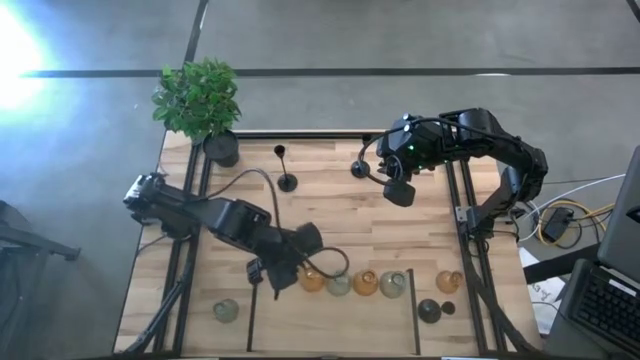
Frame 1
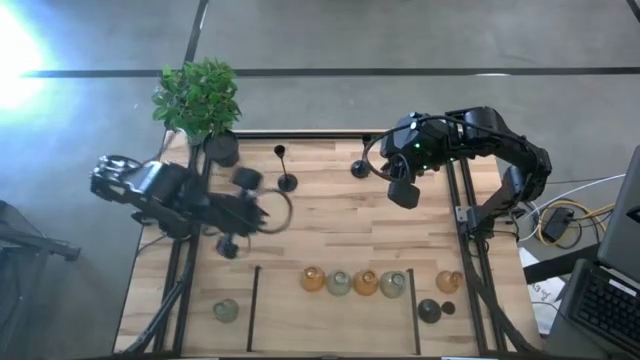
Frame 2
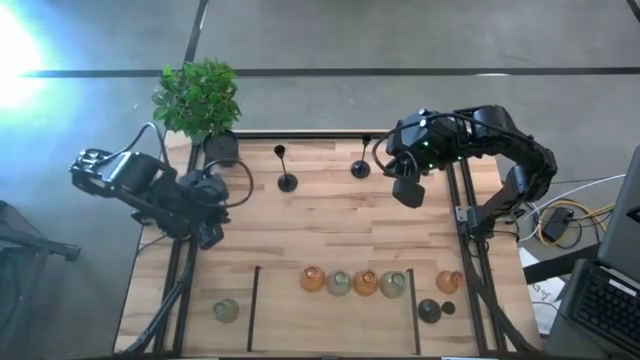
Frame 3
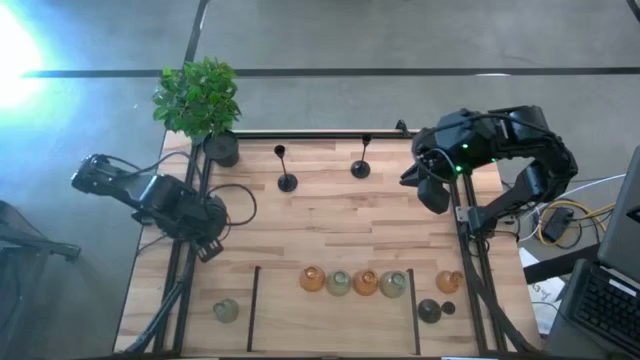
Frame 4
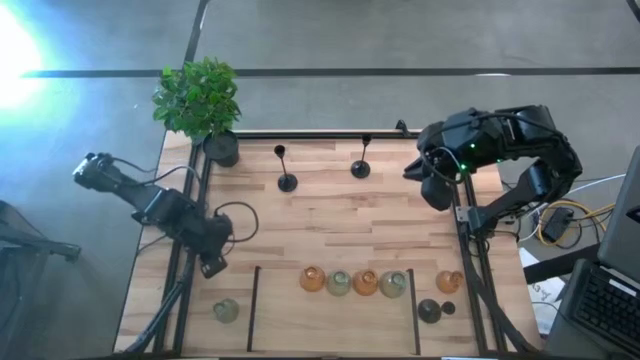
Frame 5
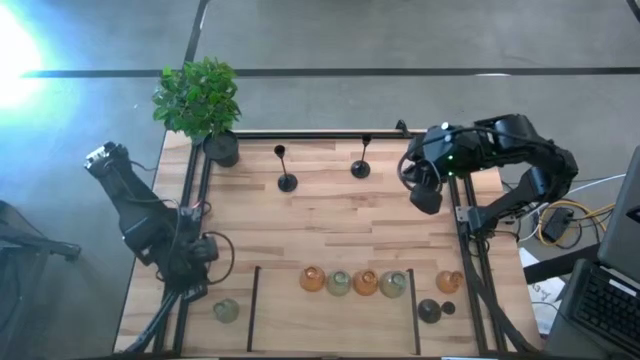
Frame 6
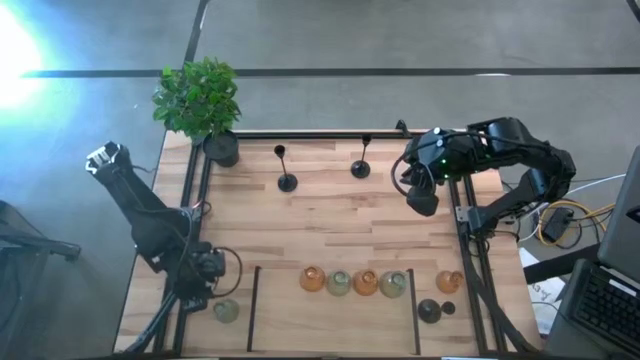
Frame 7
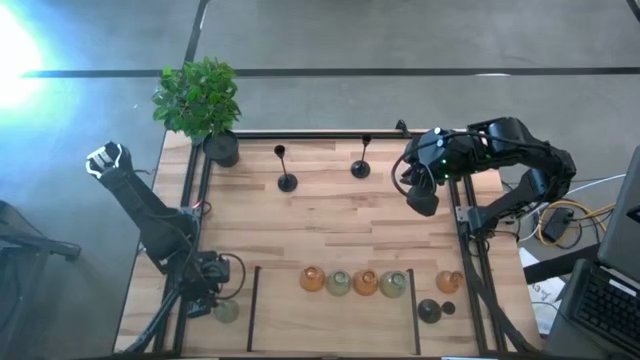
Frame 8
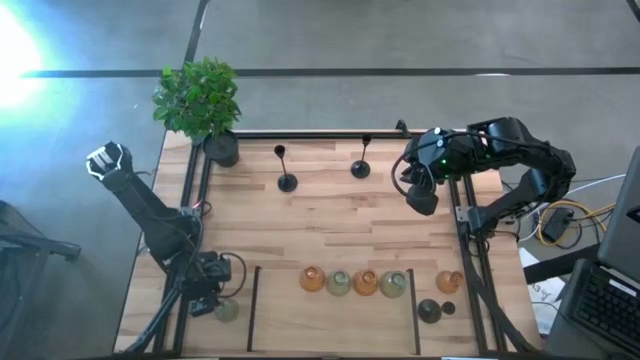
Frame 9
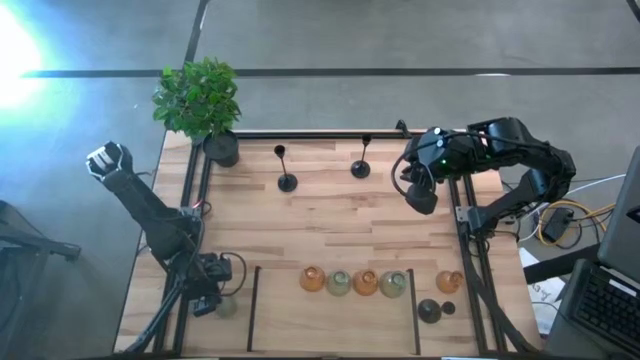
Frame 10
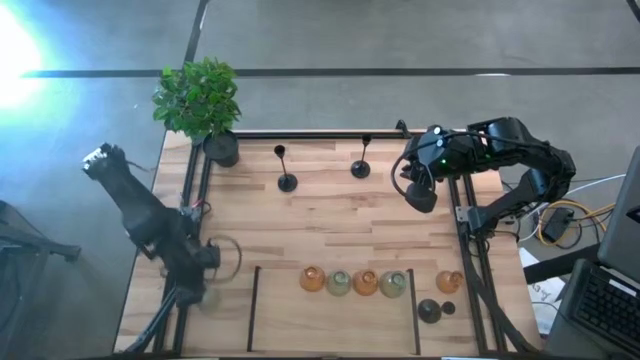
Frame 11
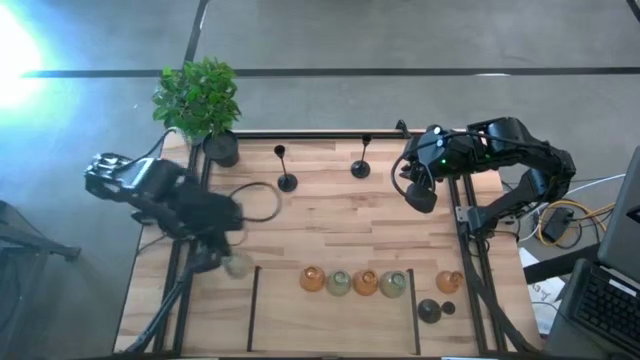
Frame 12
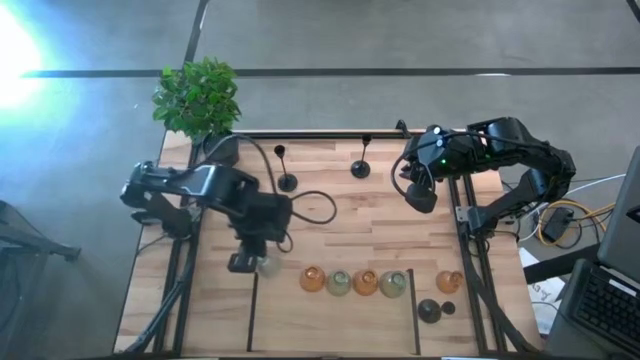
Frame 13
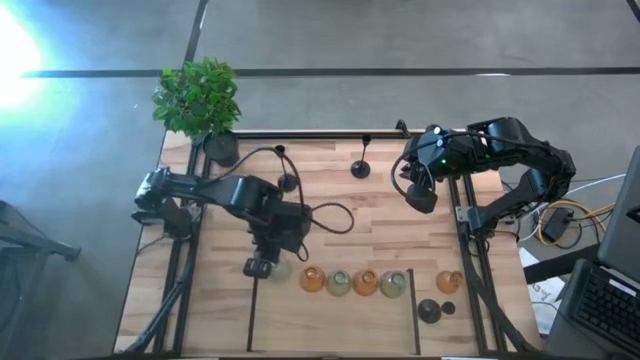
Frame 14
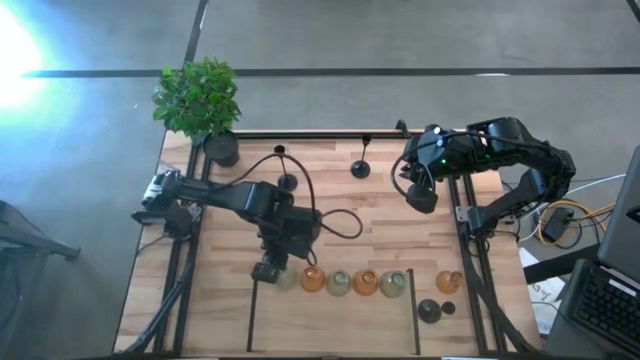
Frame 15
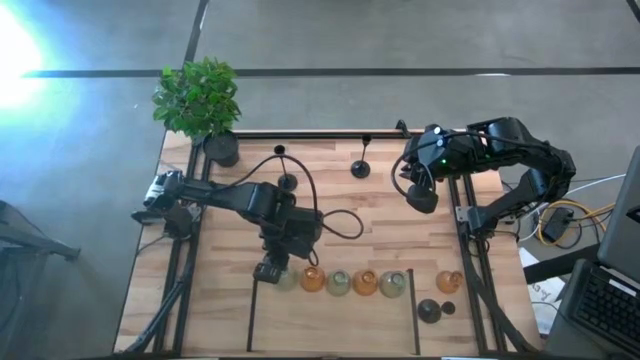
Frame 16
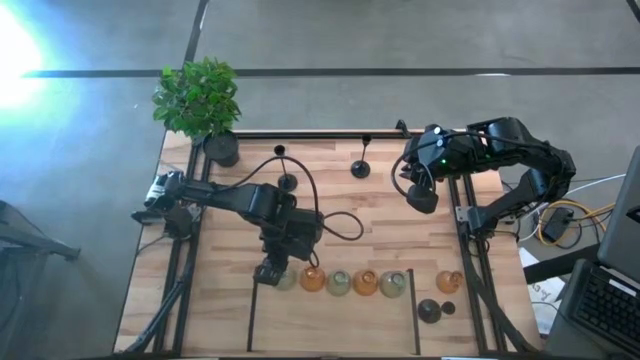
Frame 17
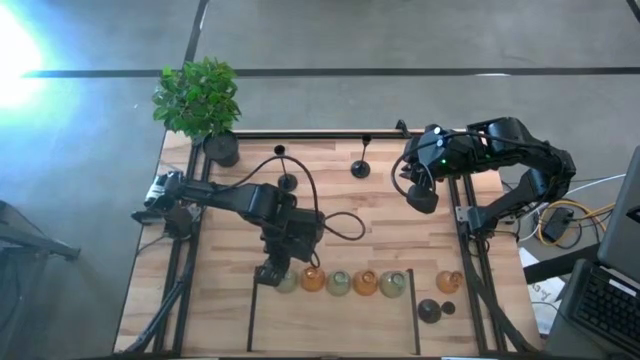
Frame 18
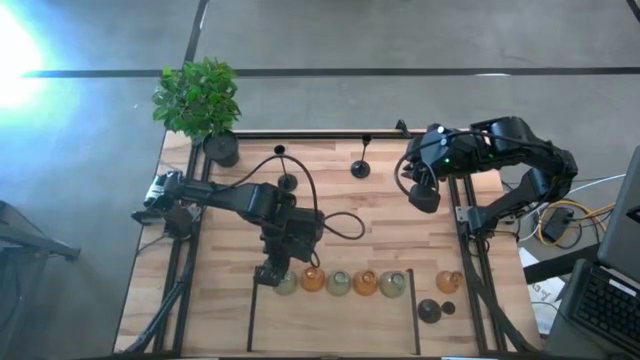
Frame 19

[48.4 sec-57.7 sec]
Task: Pick & Place candle stick holders
Put the green glass candle holder on the shelf

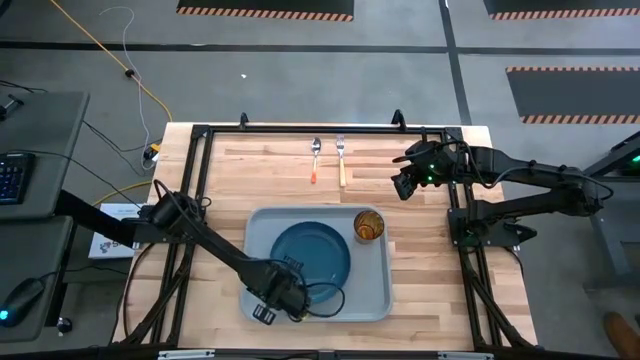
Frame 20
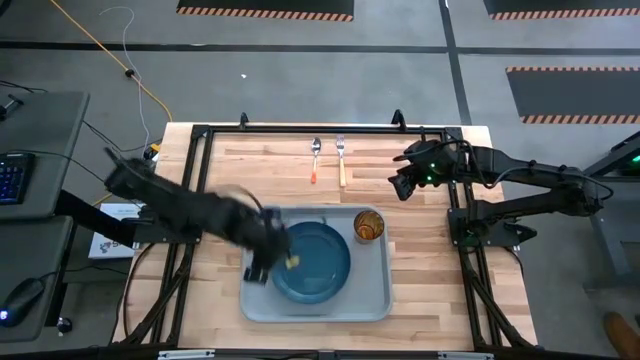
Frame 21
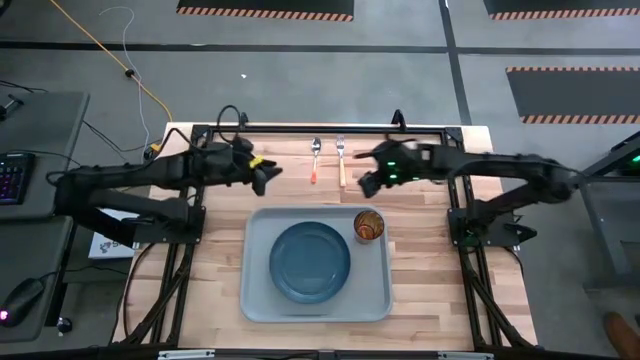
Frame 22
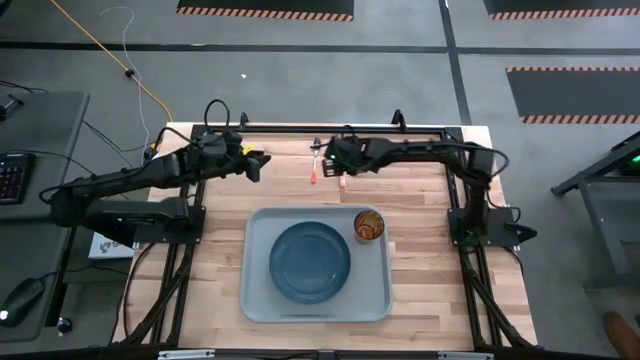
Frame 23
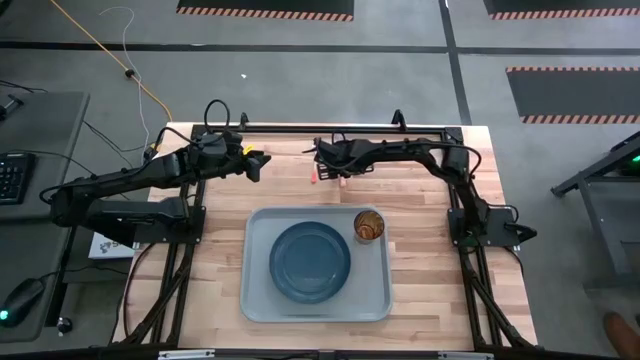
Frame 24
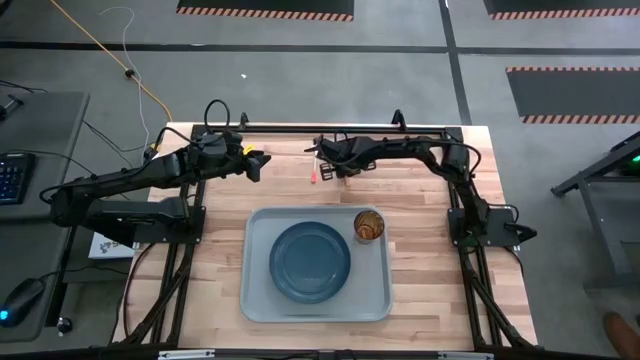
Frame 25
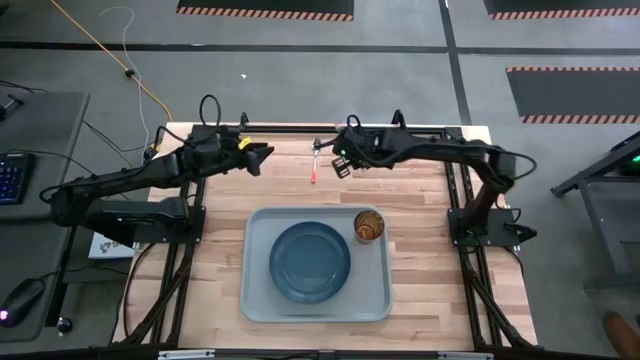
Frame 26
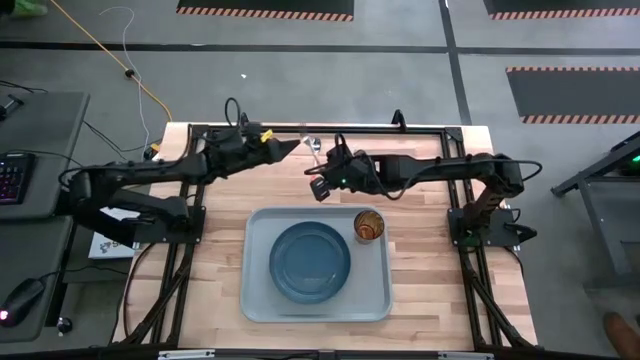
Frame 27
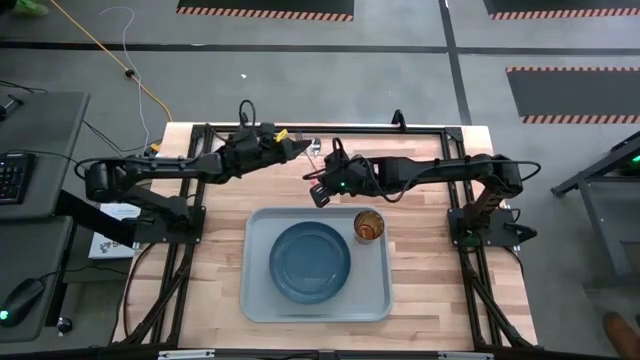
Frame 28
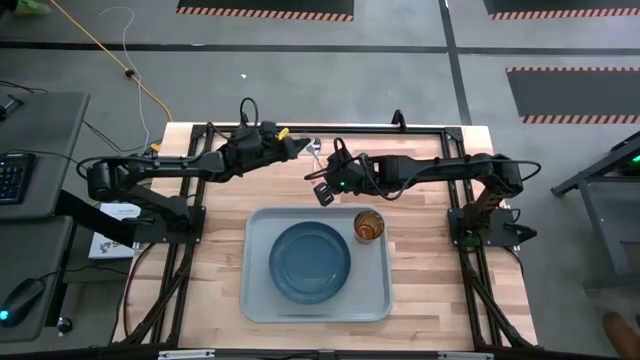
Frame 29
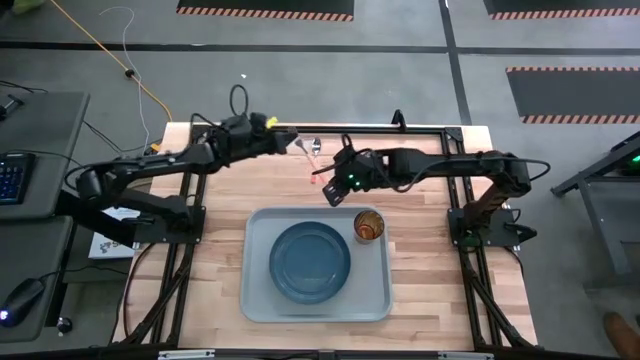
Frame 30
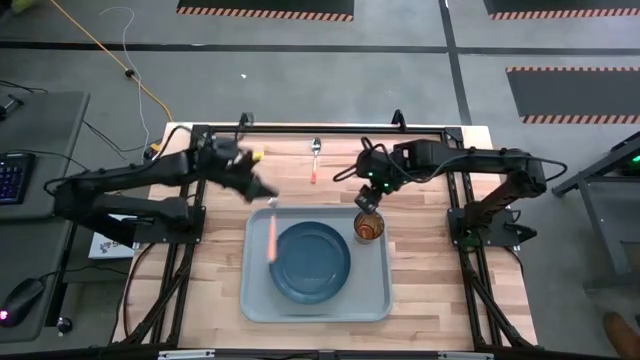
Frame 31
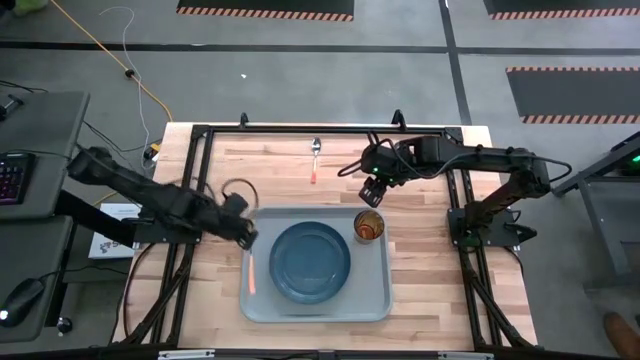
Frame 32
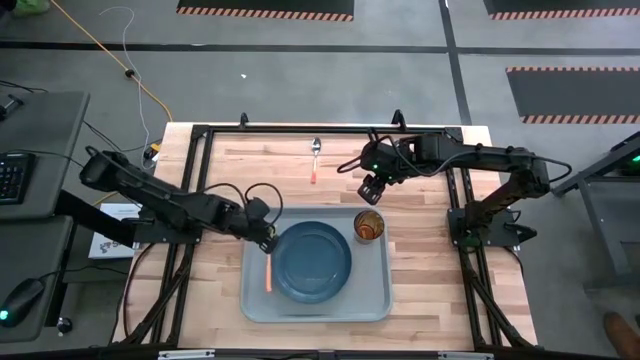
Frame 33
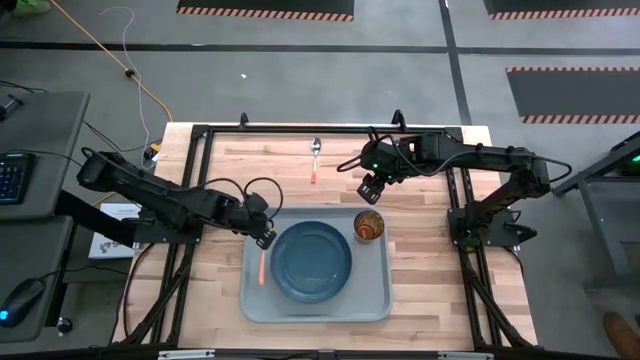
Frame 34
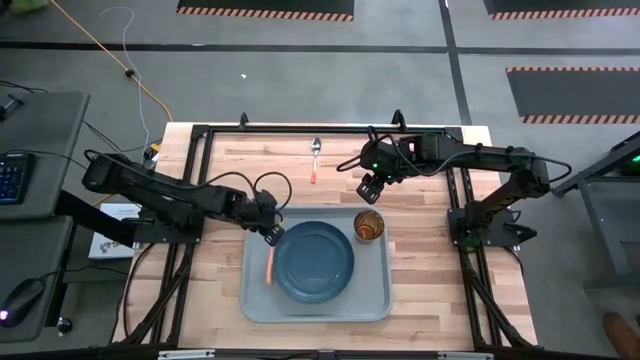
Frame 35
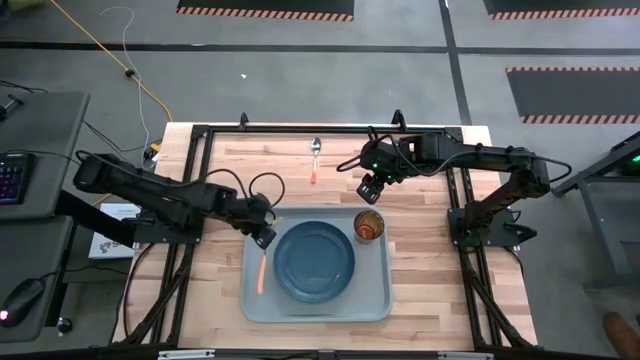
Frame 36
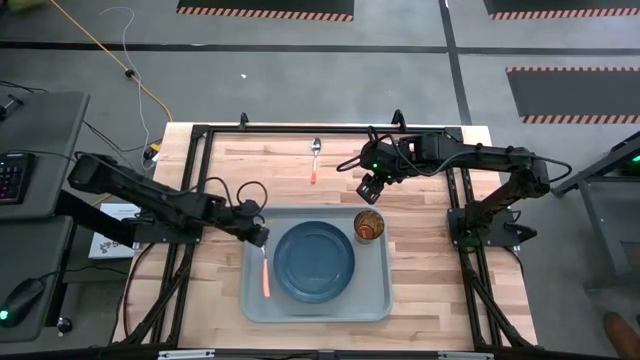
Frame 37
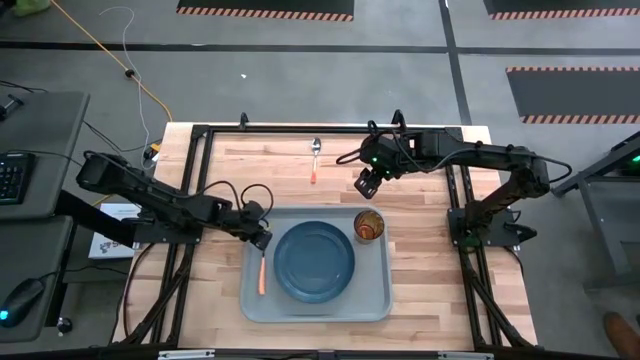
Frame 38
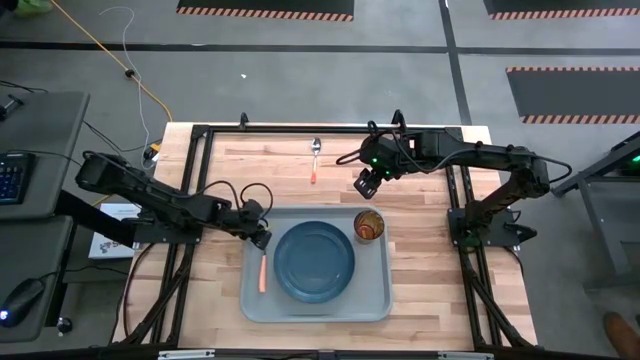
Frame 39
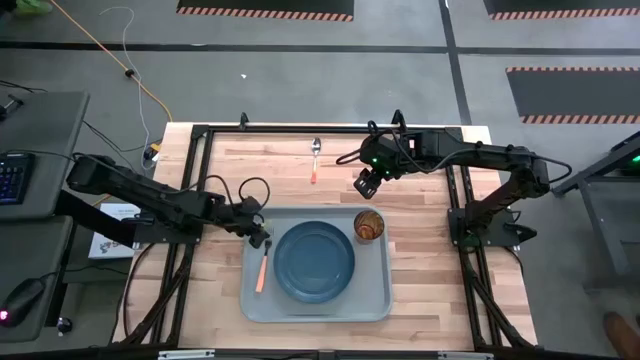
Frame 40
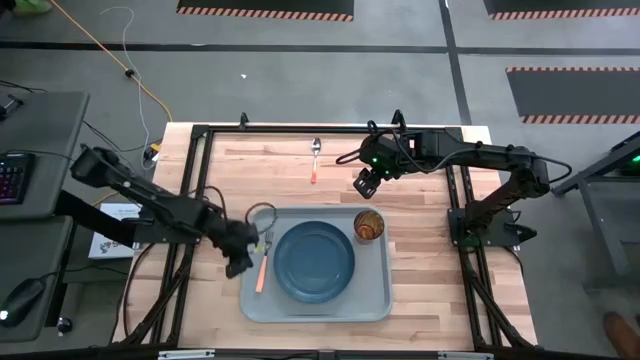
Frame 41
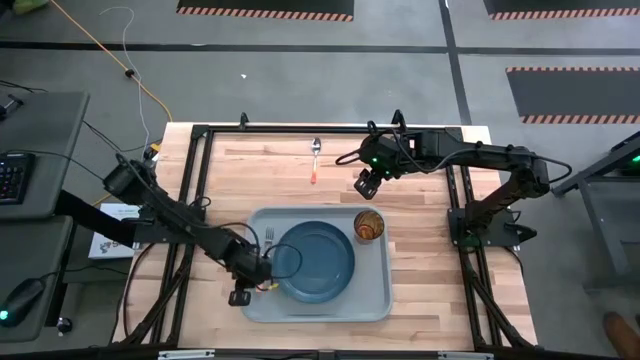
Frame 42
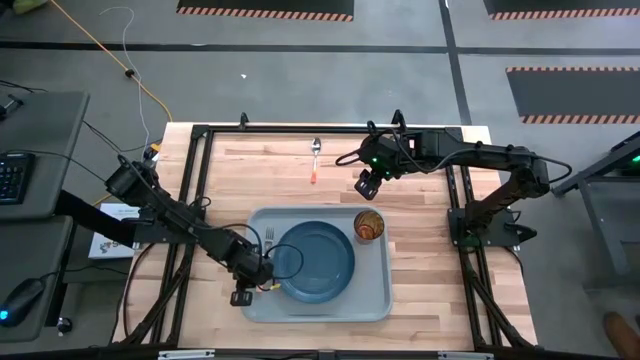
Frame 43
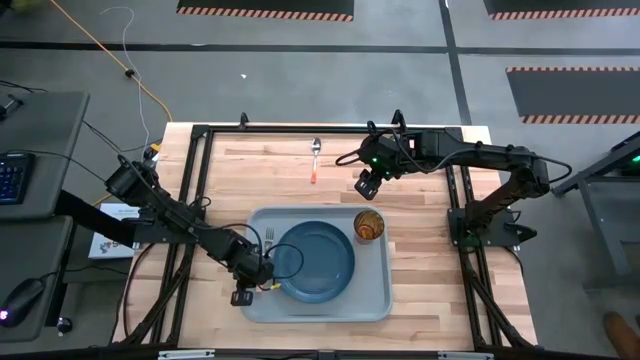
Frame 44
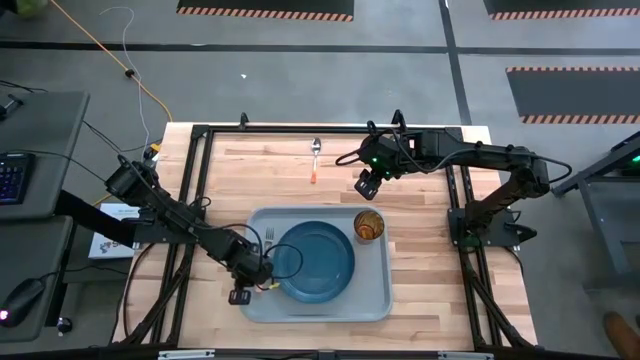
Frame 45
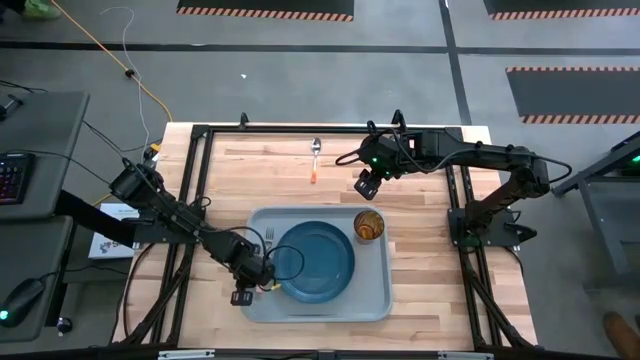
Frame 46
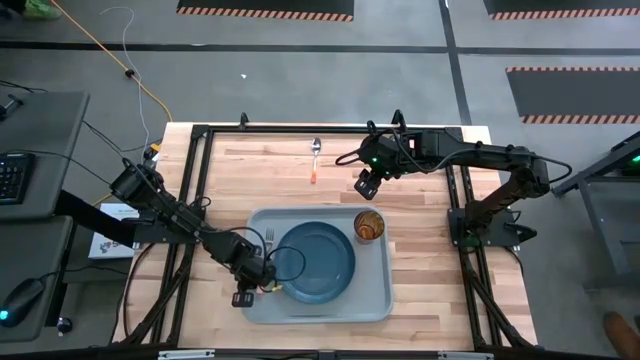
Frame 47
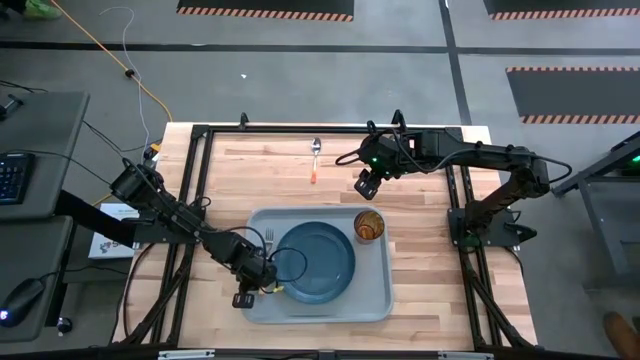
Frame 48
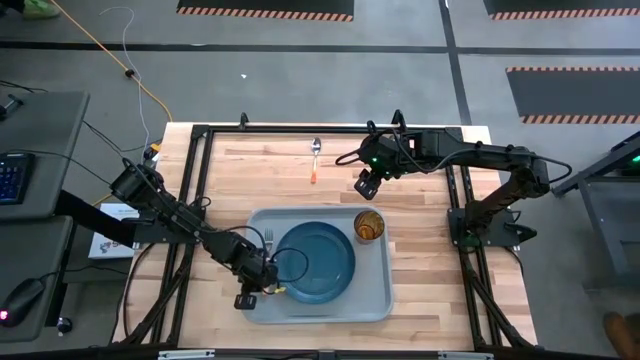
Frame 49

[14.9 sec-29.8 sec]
Task: Pick and place plate/cup/fork/spoon on tray
Put the orange fork on the gray serving tray to the left of the blue plate
